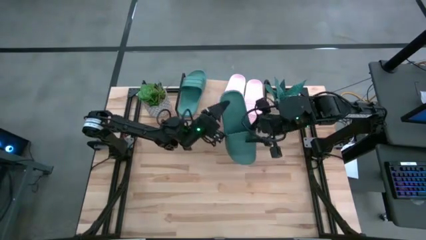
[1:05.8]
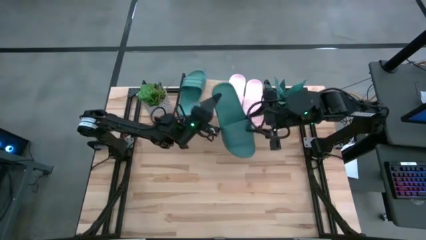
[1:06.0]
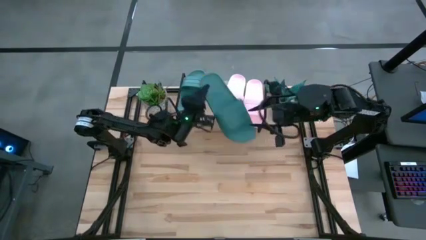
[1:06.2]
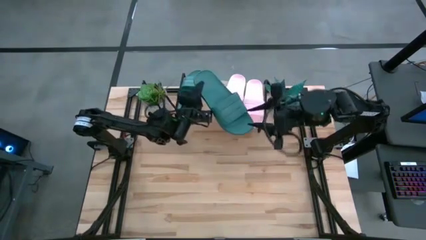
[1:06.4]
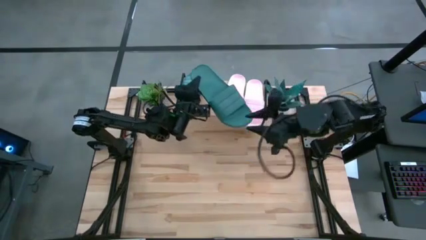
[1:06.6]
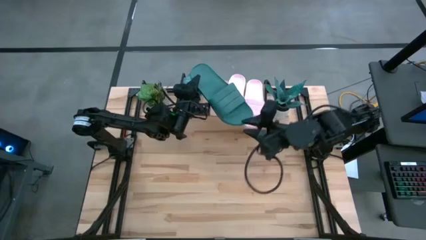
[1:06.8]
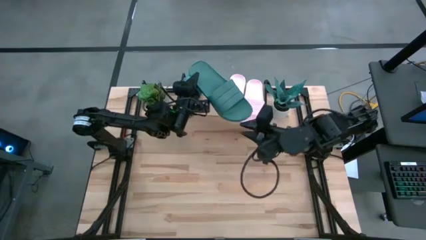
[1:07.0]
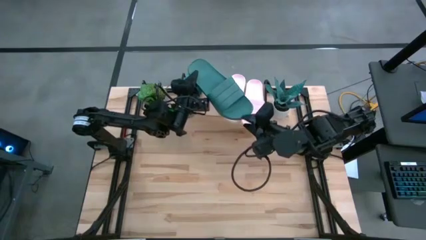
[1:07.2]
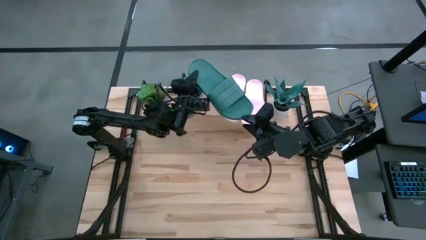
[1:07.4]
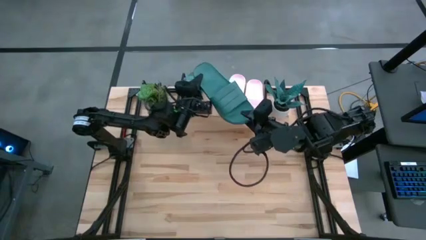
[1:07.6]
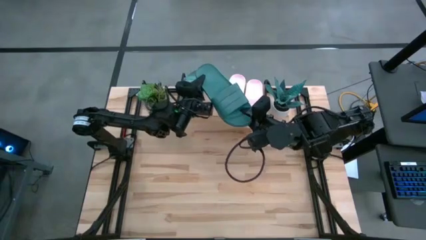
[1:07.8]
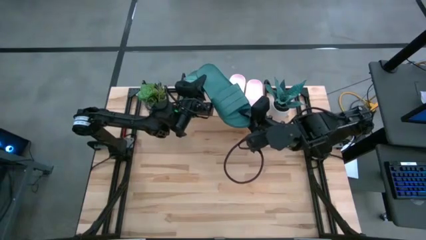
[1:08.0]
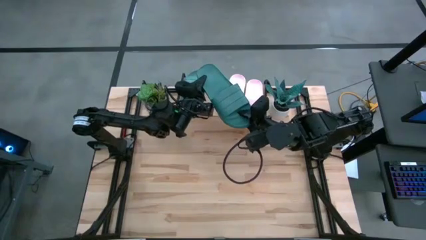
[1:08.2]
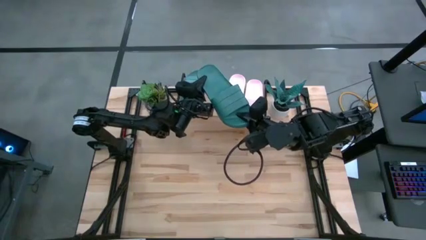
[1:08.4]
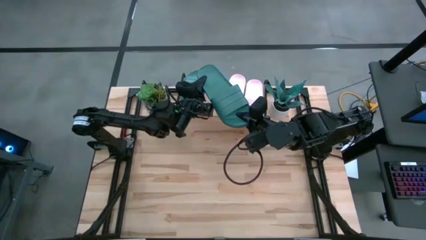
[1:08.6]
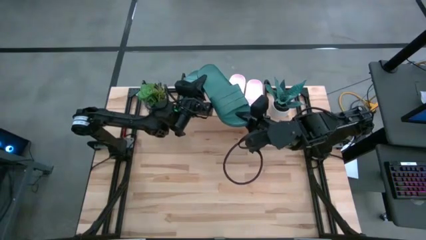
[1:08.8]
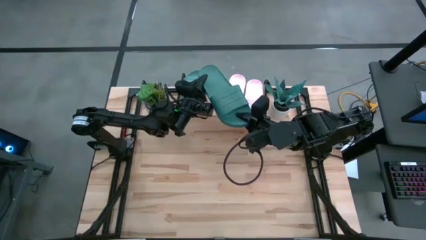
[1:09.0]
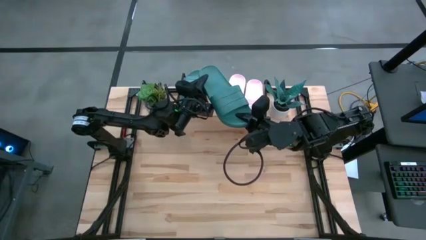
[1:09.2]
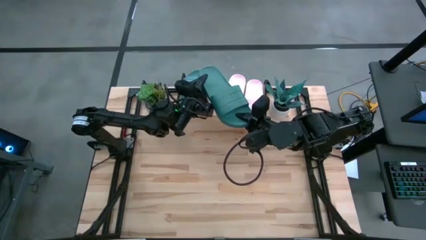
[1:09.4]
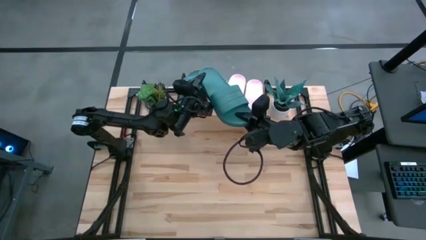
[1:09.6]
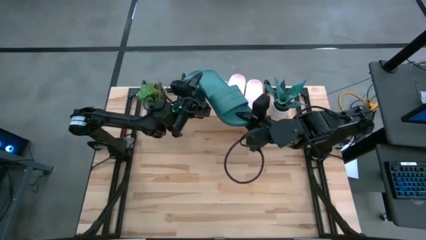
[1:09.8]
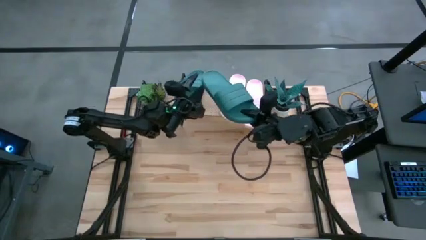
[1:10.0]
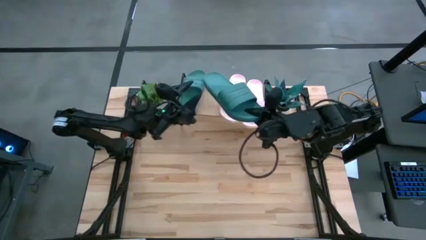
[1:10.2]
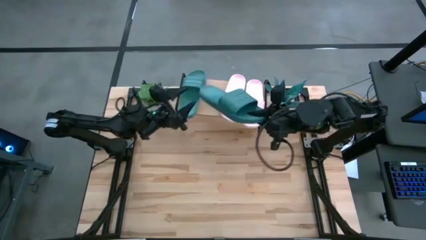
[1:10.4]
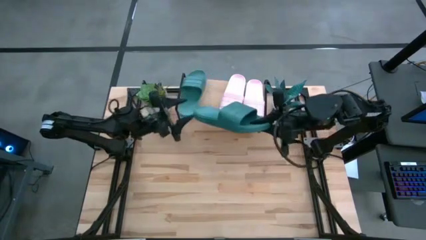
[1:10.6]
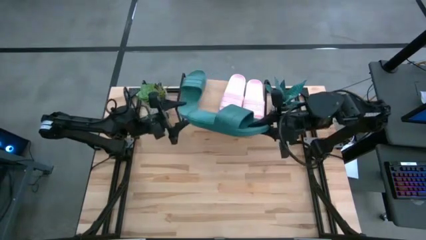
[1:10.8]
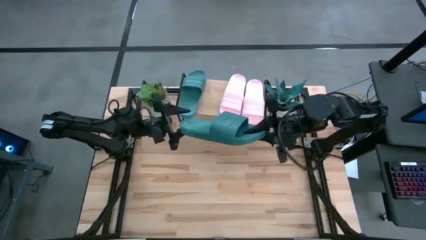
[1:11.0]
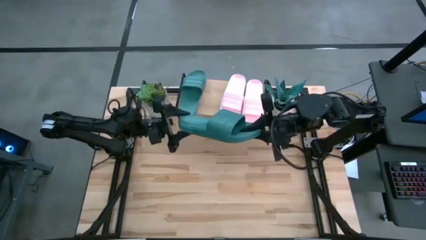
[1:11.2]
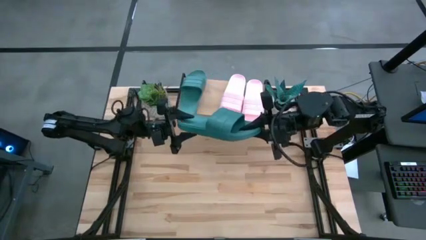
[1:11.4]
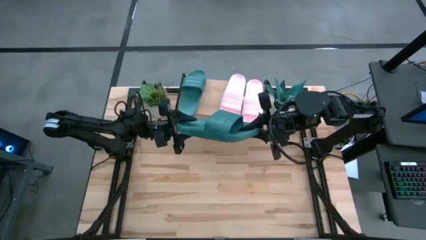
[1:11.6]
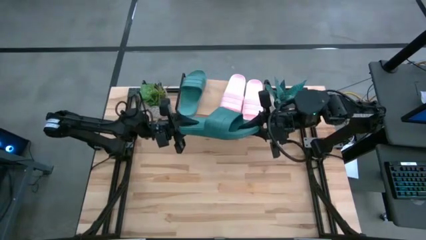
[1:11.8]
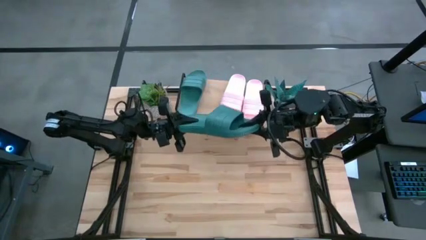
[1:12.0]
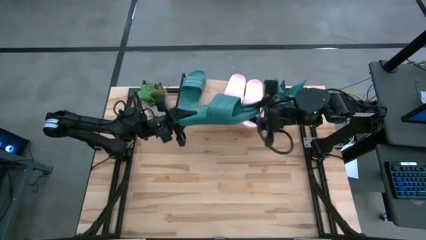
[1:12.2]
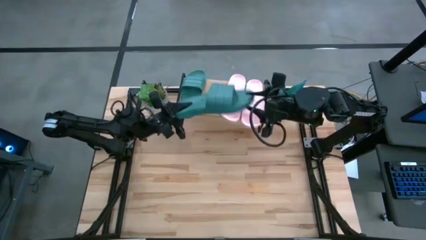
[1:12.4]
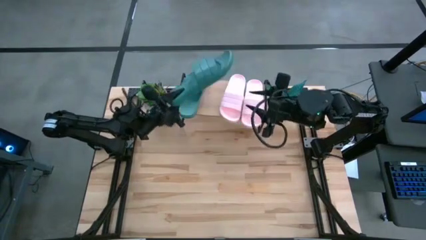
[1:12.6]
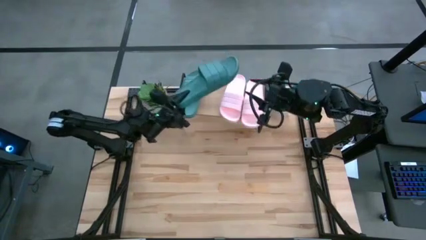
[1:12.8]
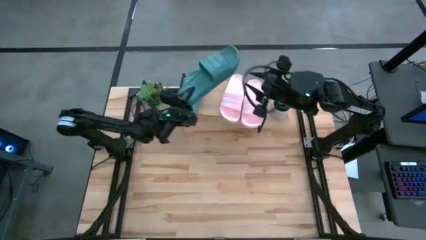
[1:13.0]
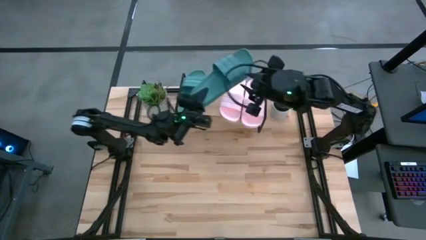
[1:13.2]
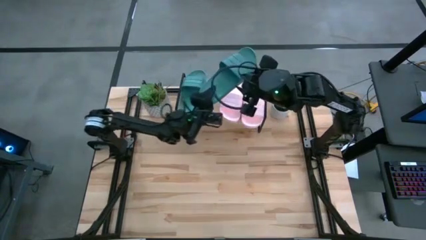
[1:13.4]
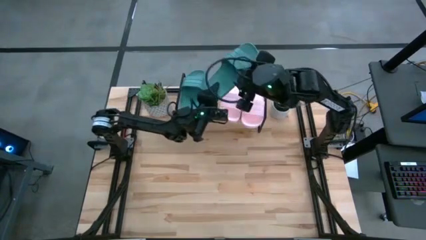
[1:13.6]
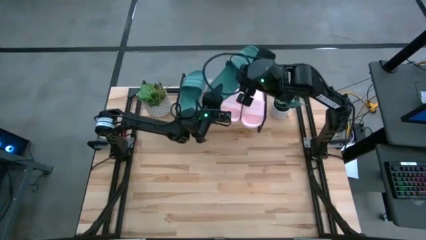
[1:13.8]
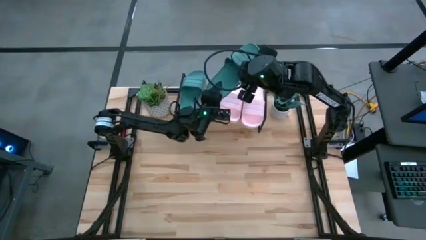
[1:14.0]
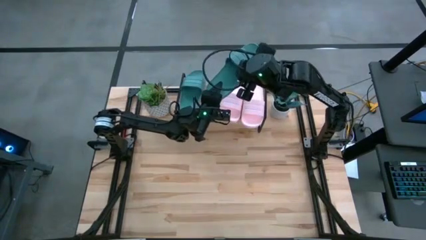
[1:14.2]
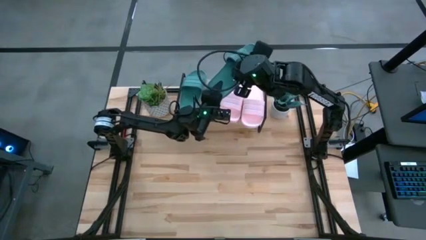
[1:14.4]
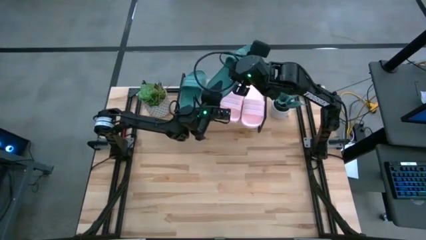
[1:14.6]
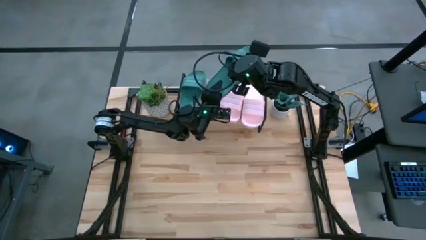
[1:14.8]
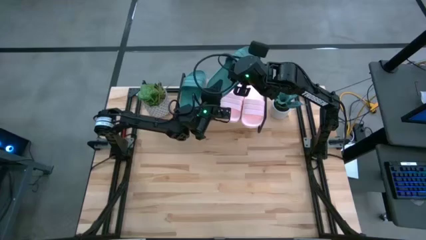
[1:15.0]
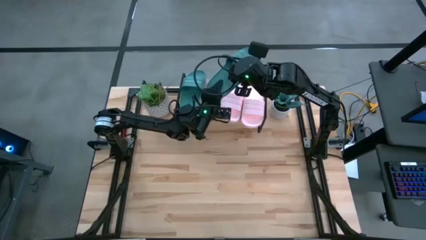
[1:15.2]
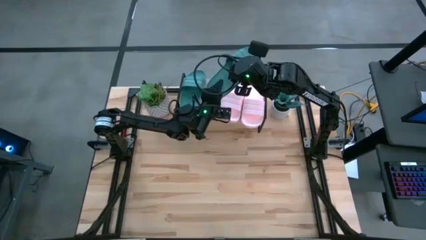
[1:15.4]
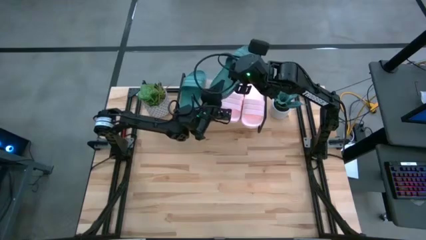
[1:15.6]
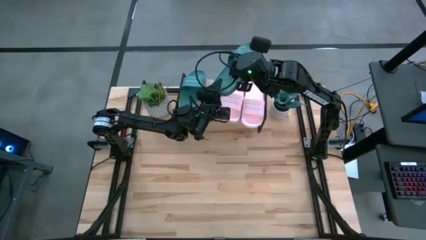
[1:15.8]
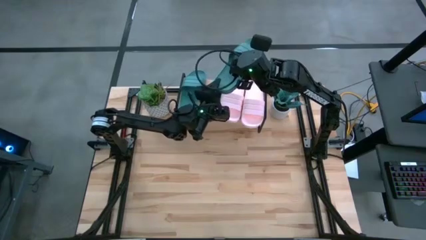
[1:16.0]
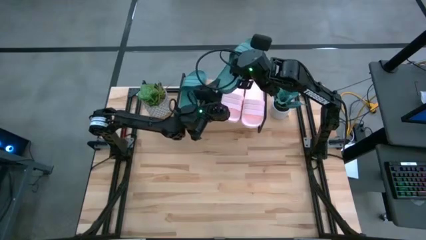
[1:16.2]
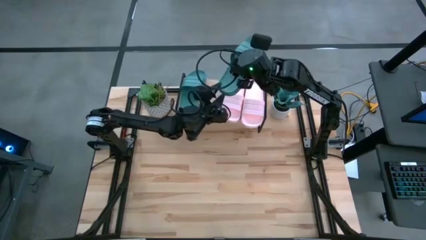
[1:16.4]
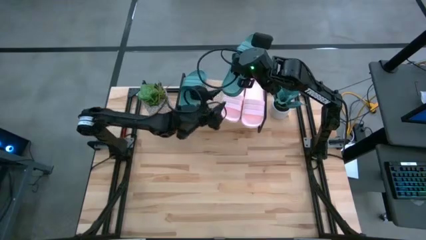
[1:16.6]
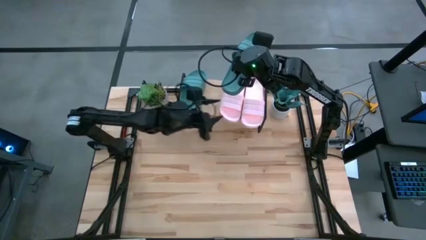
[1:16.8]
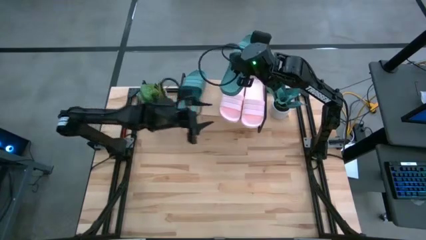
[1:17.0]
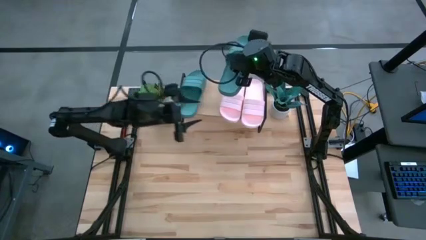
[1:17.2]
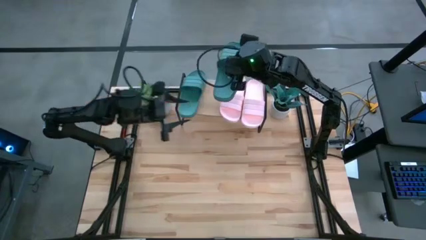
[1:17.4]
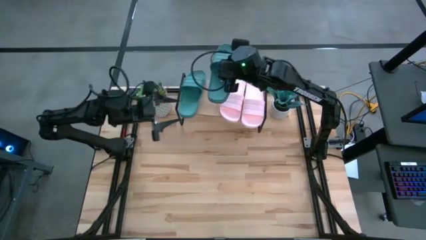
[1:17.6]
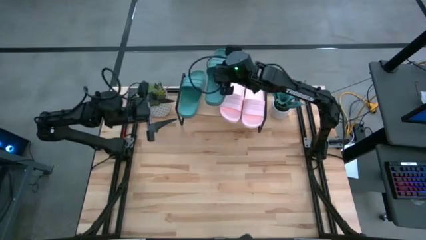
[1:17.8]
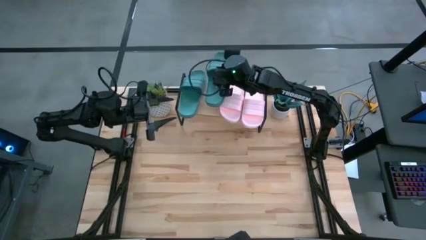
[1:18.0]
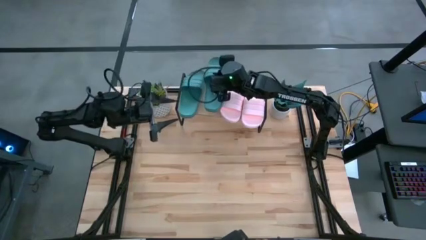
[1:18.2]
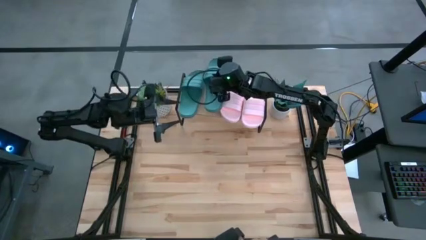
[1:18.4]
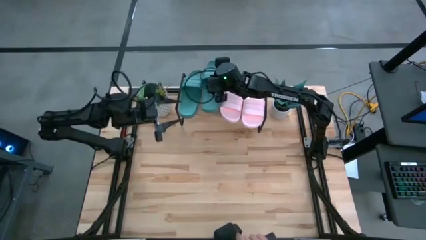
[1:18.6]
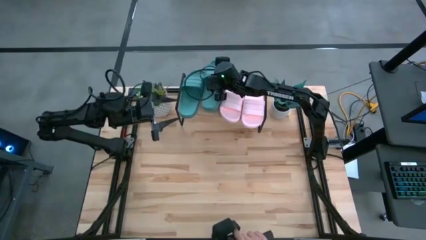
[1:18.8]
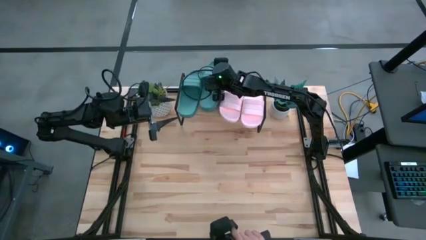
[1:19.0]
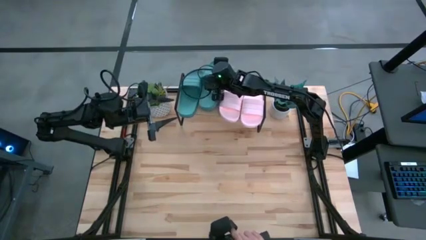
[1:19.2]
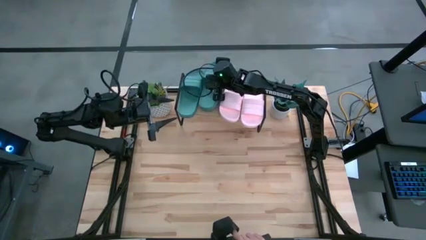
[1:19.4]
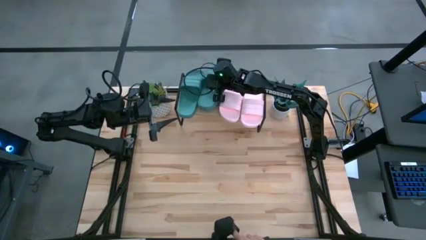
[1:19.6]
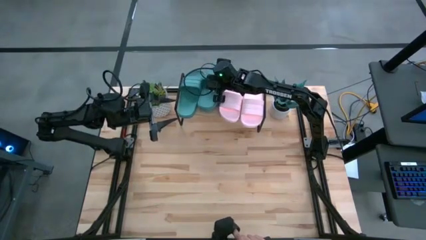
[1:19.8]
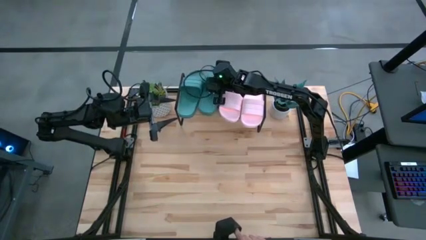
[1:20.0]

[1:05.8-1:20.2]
Task: Pick and place slides into the shelf
Put the blue slides on the shelf

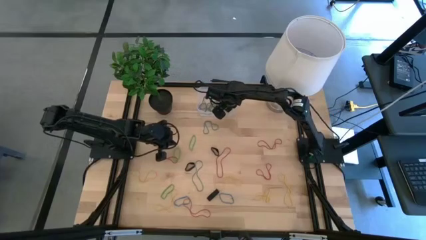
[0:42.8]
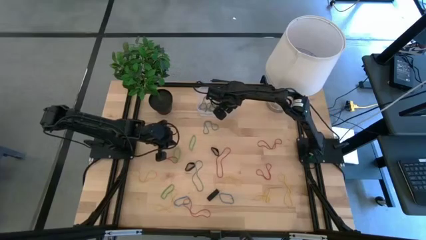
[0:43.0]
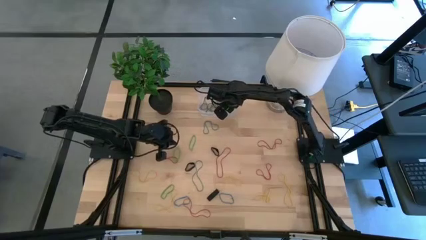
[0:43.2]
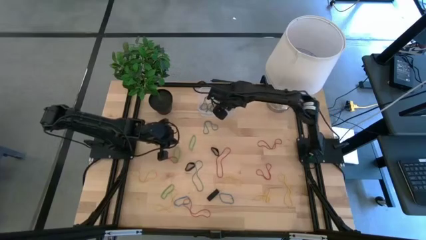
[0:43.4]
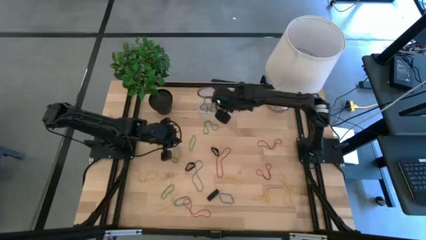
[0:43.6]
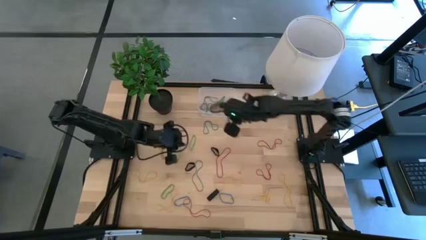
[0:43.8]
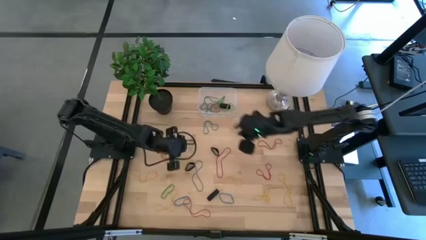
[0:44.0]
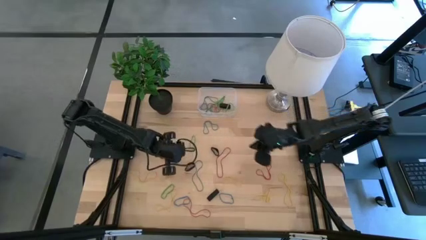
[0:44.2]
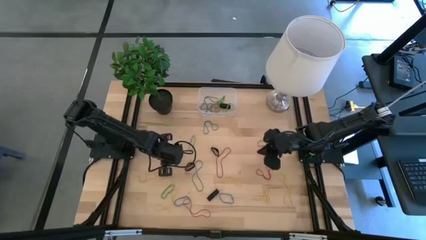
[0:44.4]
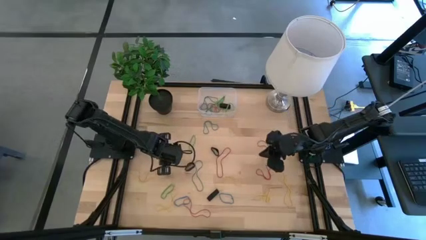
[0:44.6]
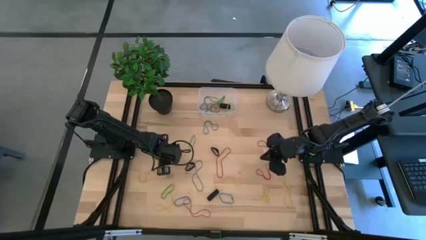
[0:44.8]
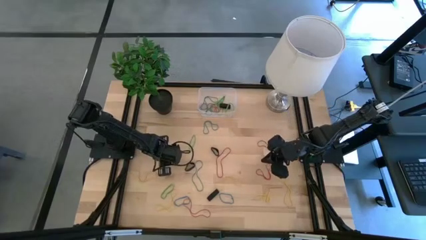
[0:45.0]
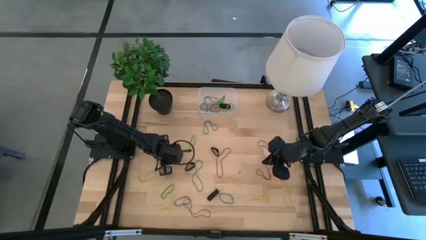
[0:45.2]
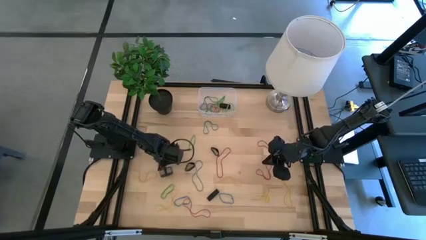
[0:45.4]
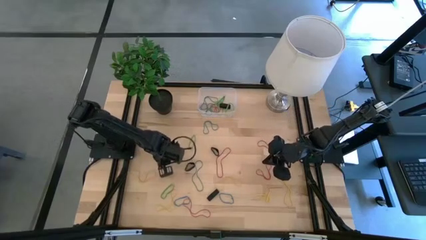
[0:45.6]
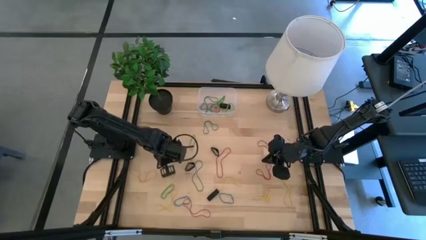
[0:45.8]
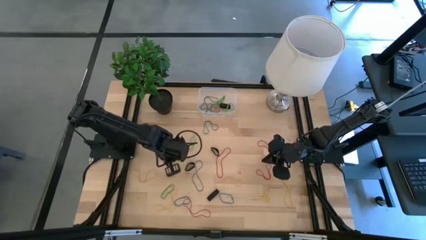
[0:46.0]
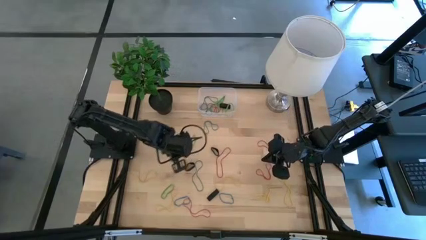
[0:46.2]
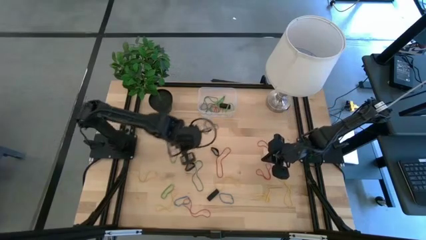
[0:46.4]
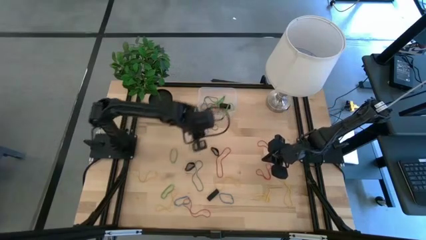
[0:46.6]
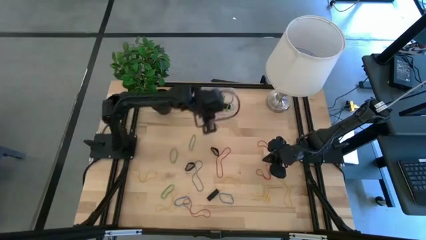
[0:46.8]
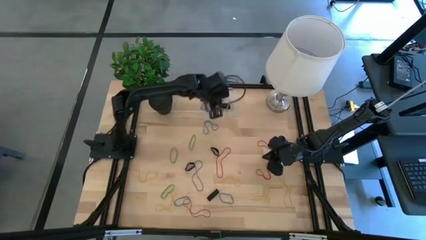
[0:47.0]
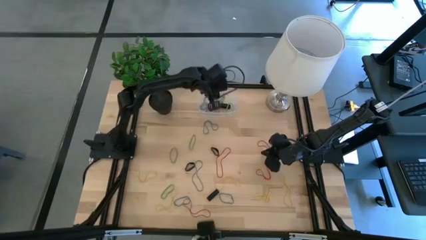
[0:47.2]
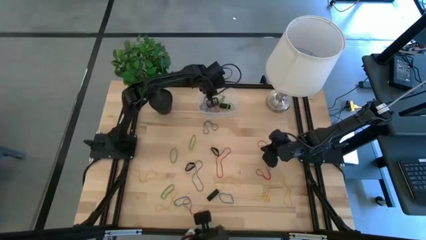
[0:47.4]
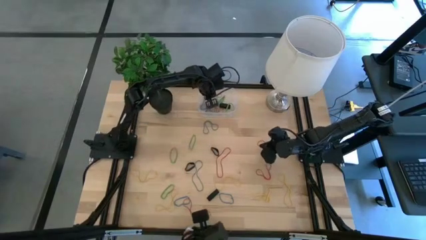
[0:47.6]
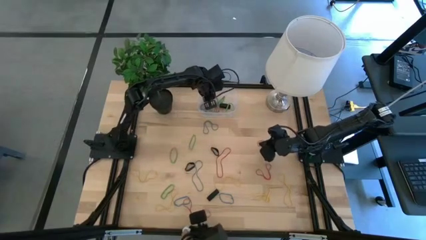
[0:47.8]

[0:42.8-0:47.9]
Task: Pick and place rubber bands into bin
Put the red rubber band into the transparent bin
